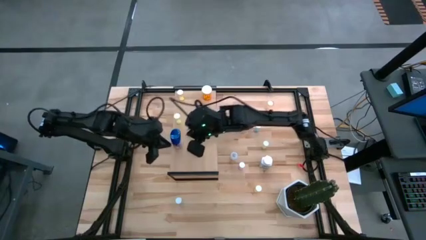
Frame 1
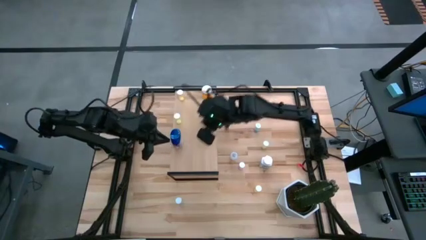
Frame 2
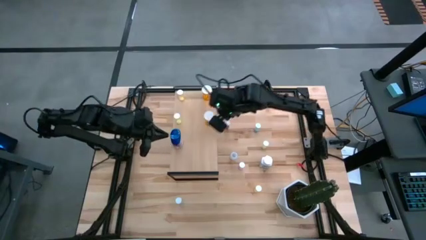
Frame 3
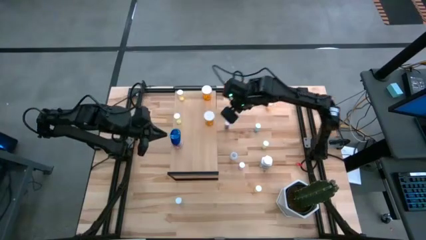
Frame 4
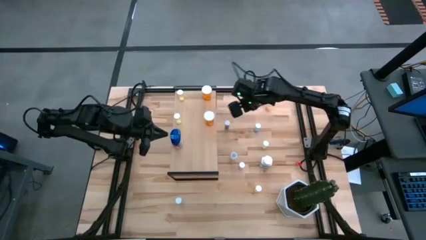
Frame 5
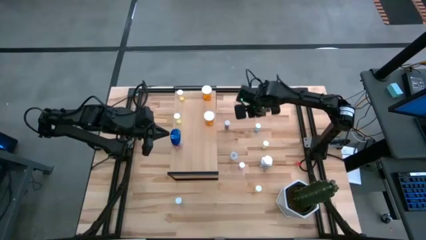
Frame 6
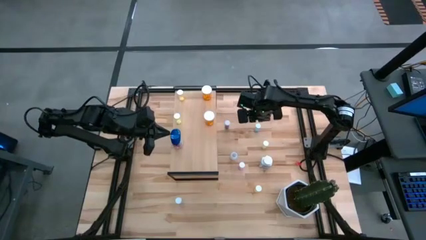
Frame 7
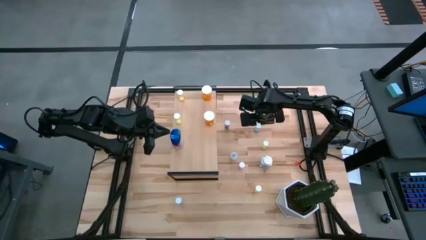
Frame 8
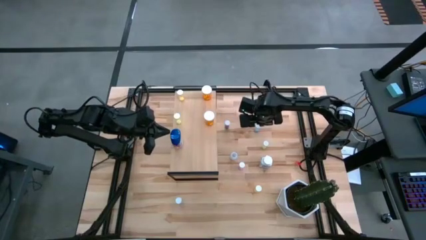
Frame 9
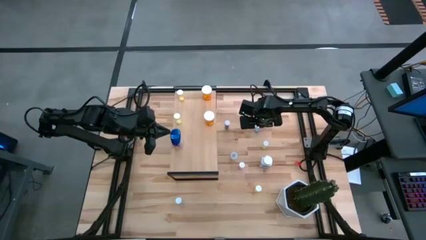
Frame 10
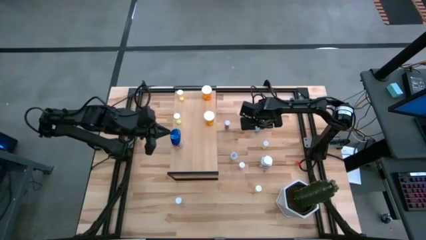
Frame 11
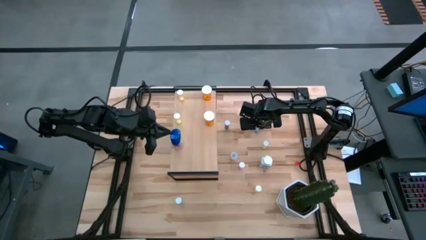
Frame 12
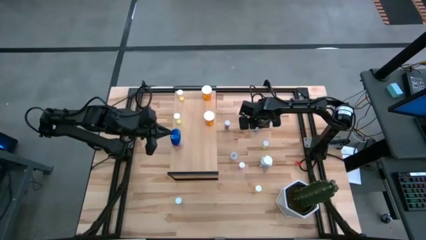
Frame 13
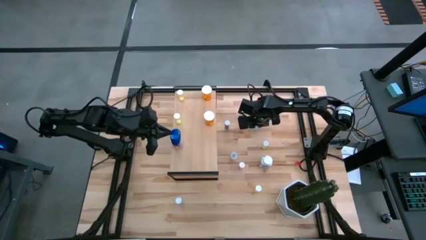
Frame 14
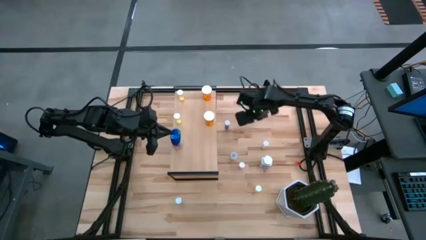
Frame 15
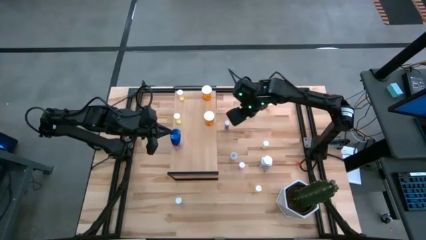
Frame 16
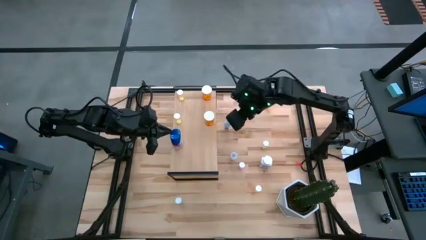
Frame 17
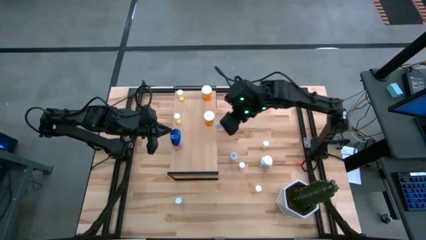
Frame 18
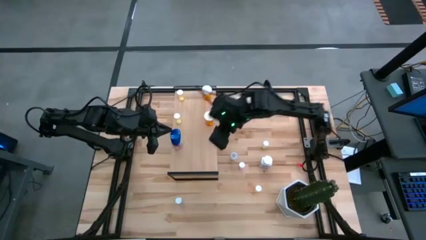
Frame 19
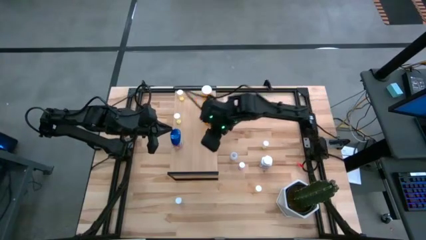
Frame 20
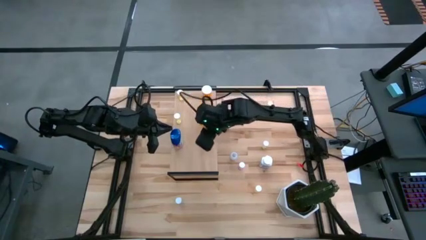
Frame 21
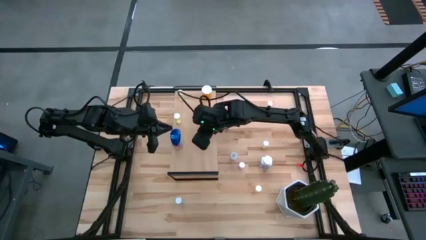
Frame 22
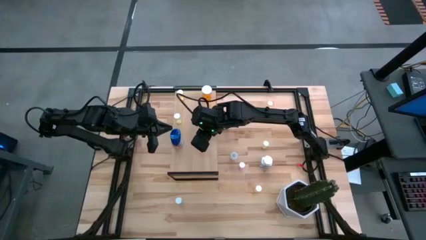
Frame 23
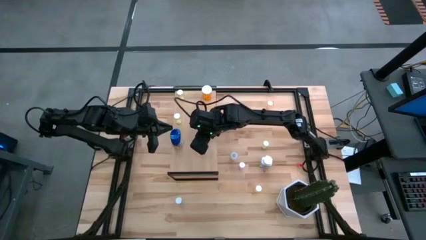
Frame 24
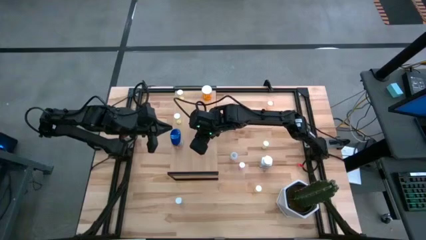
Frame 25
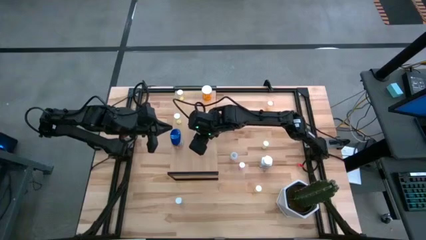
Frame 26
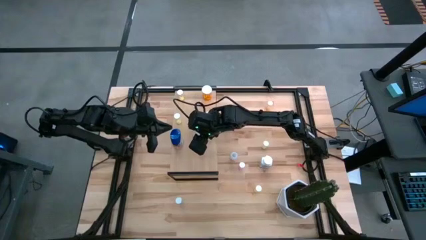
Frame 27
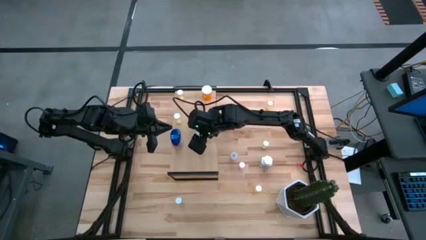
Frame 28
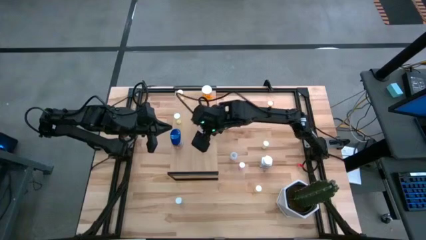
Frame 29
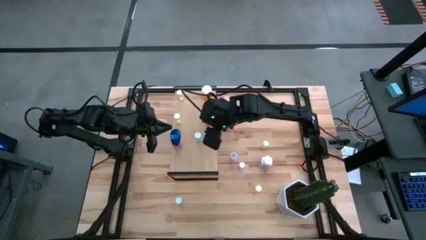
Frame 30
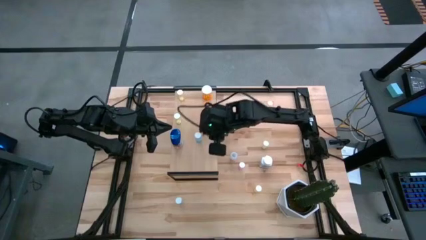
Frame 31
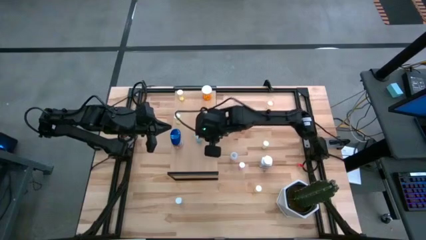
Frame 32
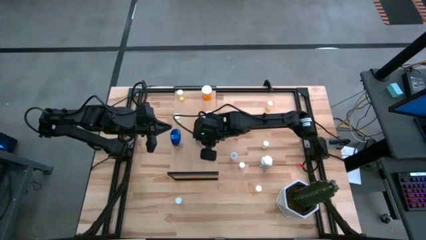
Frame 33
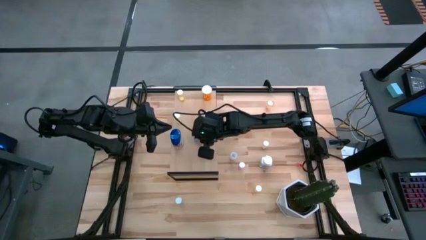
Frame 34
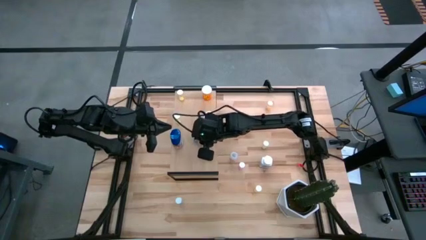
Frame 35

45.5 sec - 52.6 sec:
Task: Pick and place medicine bottles onto shelf by color
Put the top right blue tablet bottle on the shelf

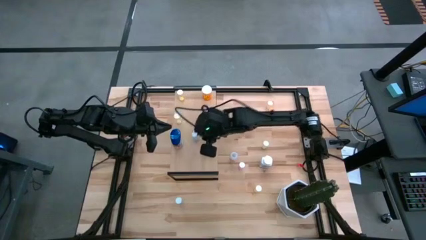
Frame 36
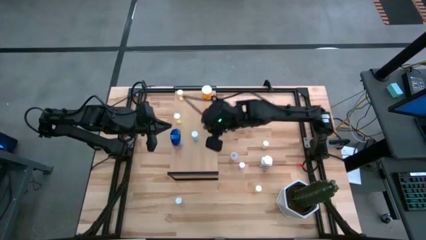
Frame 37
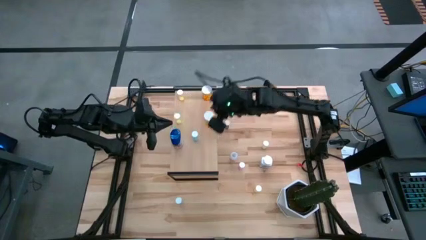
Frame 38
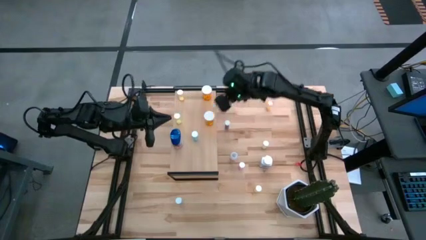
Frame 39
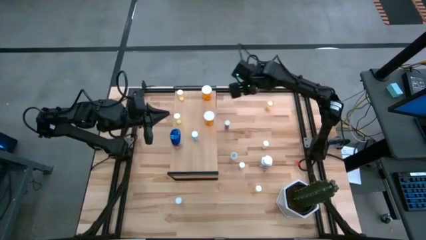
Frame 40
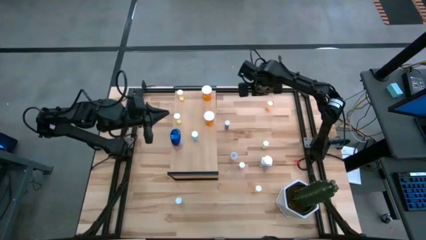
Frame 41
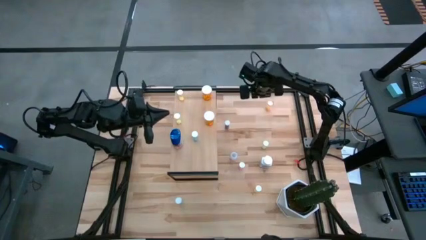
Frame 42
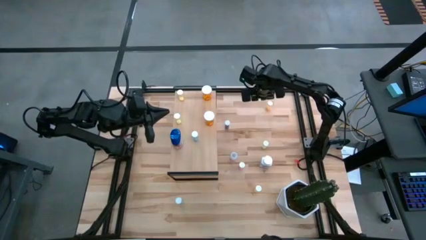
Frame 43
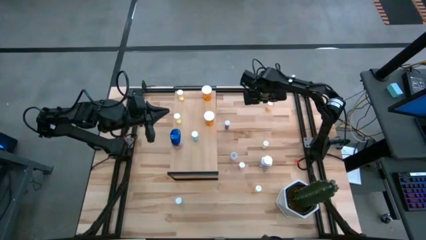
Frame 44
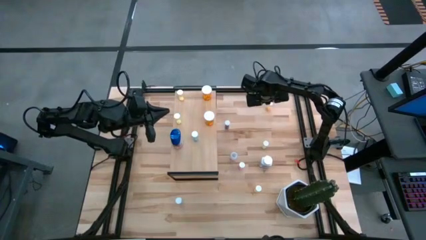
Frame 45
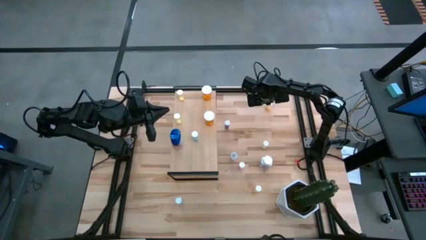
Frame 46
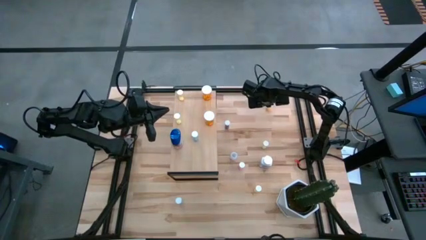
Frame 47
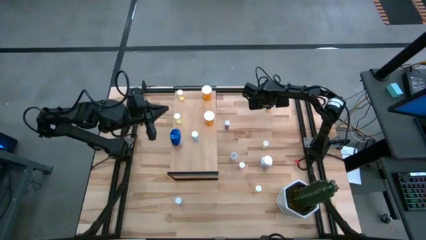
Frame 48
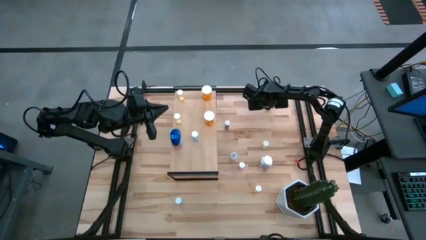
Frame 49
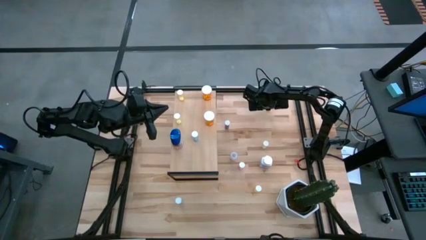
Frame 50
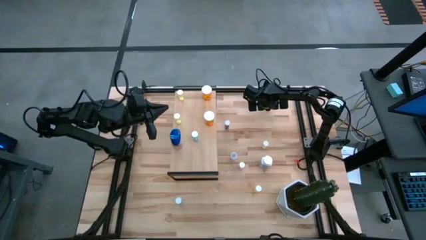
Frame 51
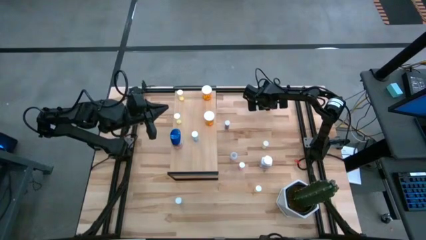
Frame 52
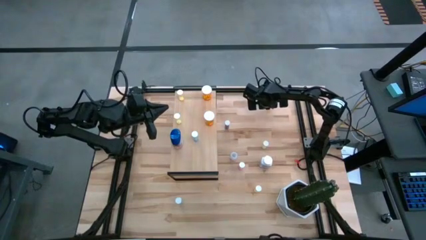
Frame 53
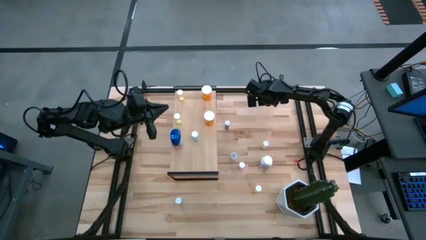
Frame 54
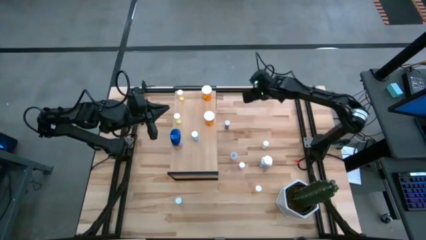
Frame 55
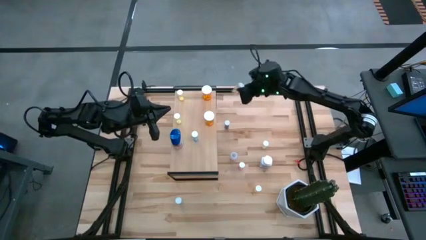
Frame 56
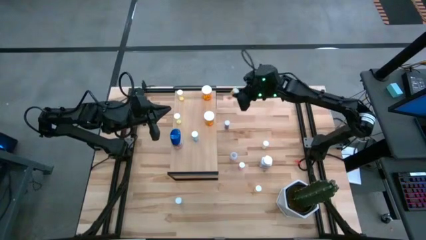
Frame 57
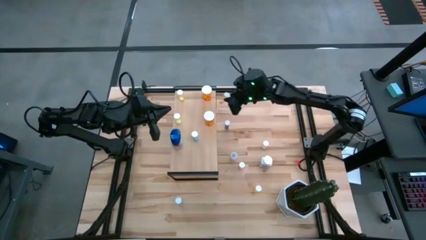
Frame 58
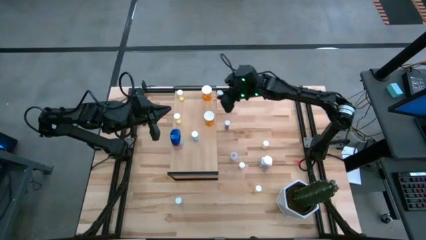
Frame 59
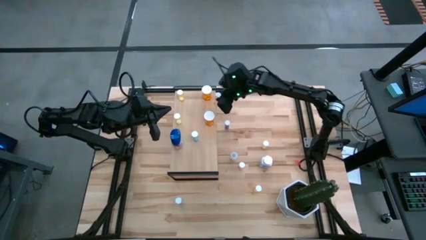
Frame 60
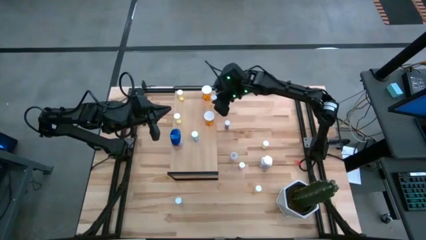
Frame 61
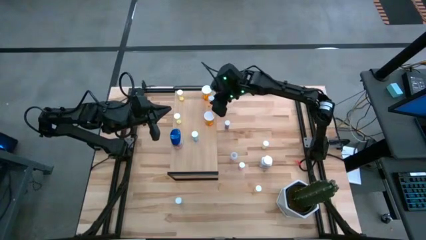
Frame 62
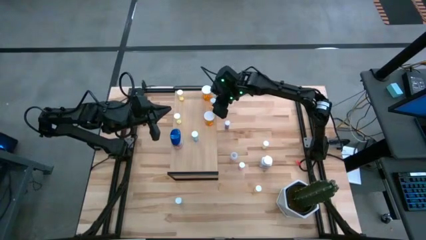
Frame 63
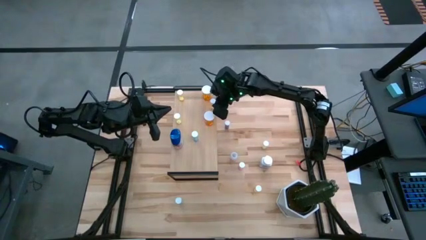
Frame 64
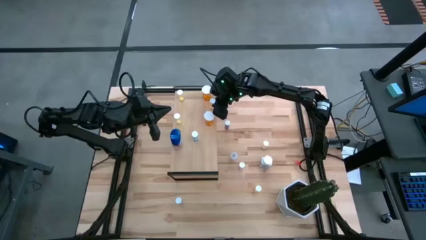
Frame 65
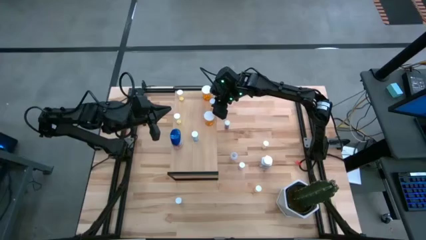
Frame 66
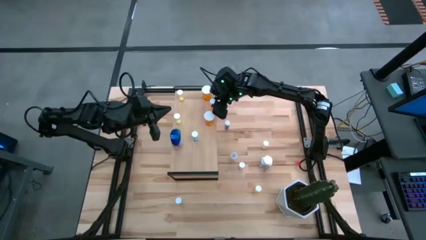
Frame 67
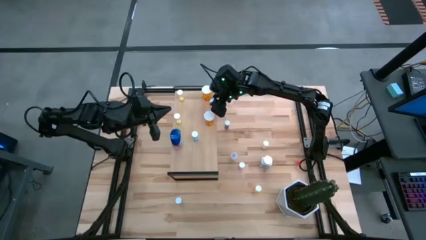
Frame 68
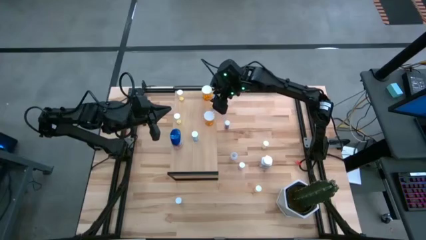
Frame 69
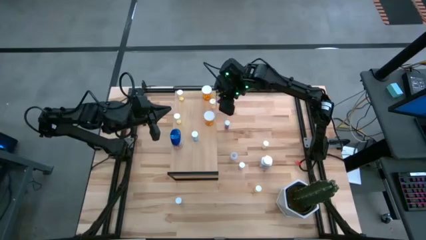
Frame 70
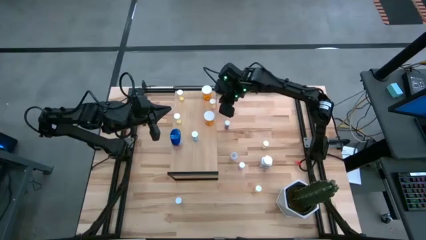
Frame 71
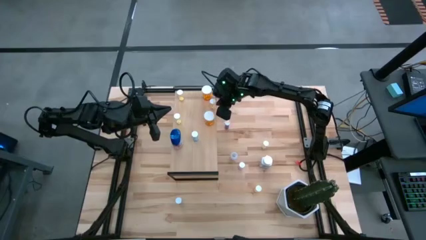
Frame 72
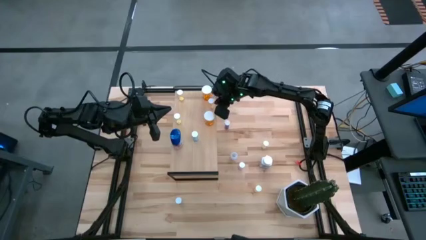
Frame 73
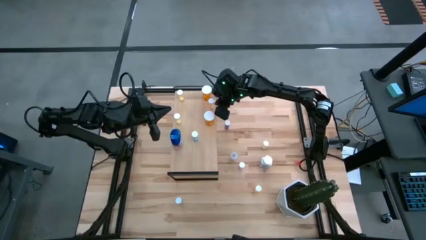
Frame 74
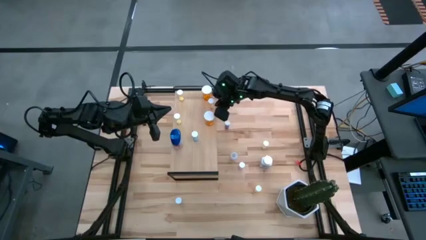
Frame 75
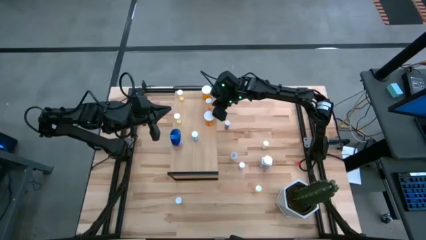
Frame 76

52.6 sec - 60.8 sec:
Put the top right yellow pill bottle on the shelf

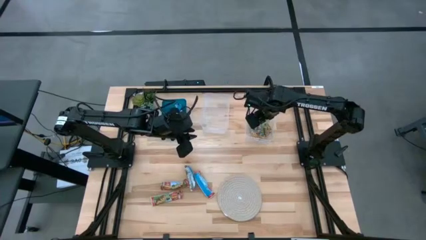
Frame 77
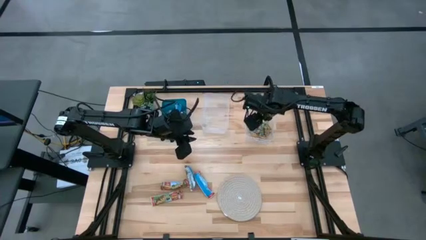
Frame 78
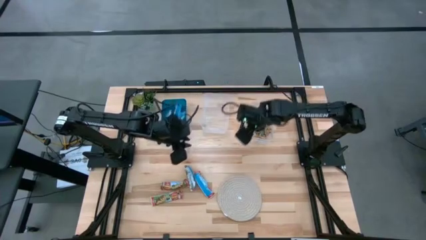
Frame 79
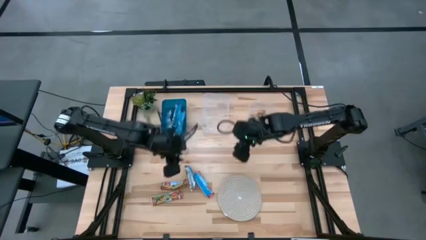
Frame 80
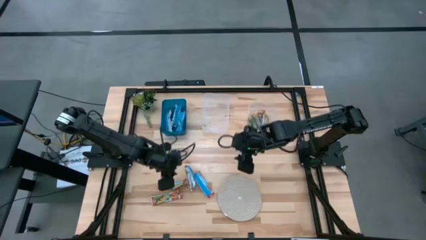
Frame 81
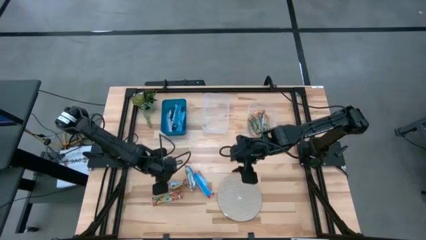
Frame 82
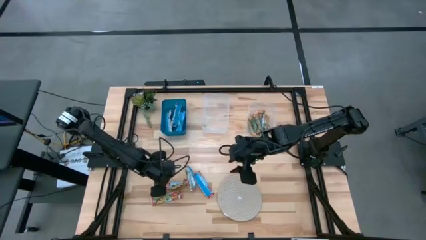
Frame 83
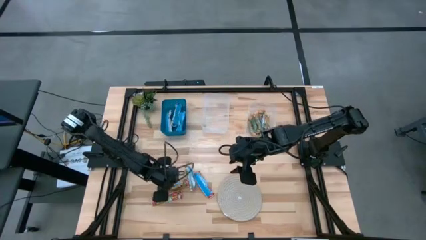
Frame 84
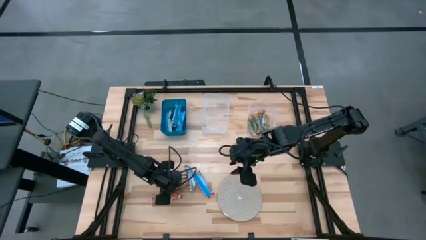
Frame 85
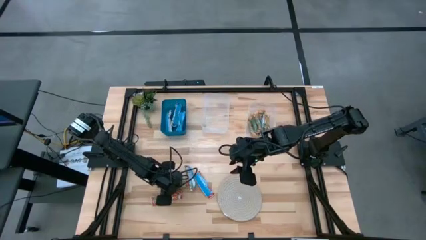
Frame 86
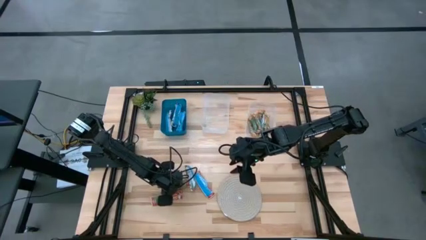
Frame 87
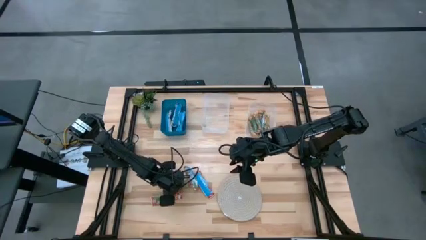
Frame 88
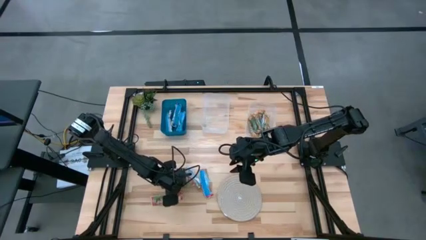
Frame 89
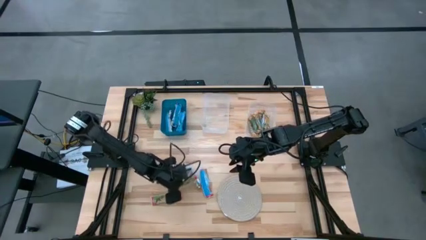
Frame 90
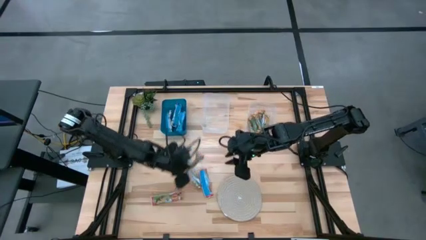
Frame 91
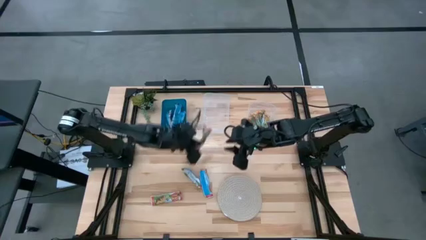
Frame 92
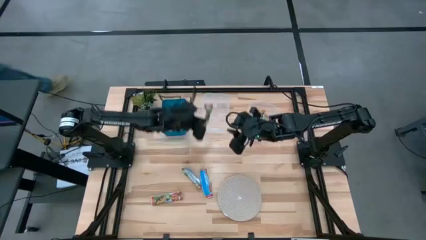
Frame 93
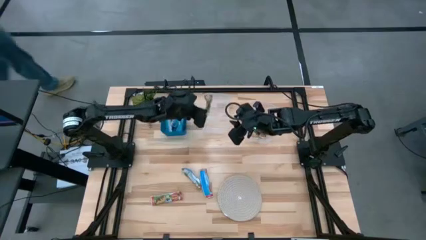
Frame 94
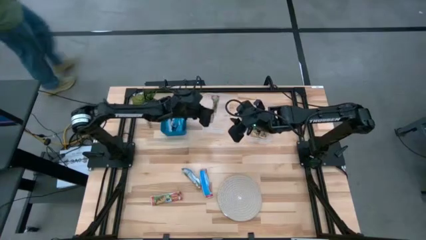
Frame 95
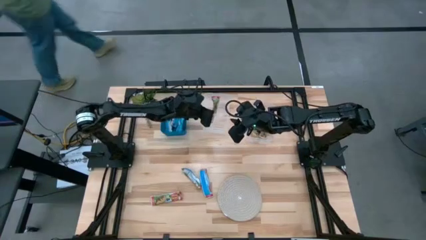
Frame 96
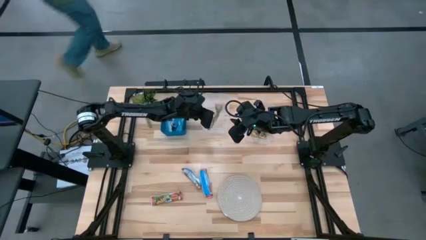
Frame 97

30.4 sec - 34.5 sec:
Task: Pick and place Granola Bars by type
Put the red granola bar into the left transparent bin
